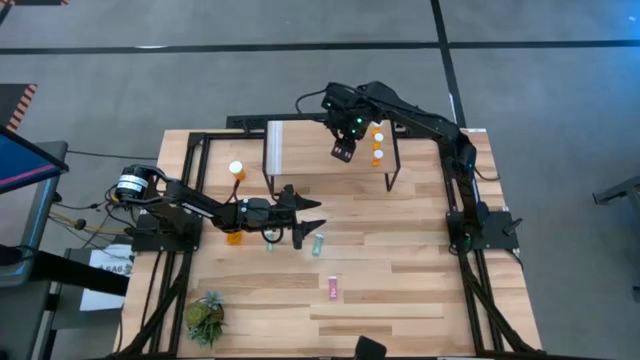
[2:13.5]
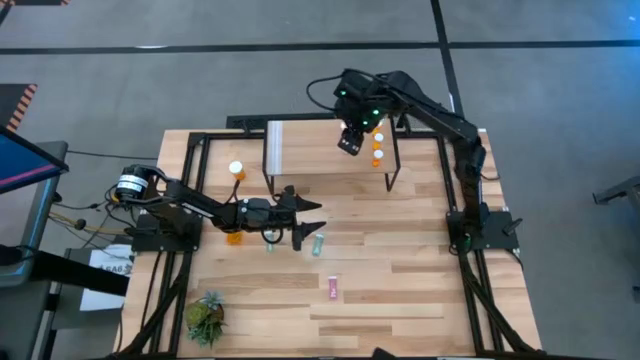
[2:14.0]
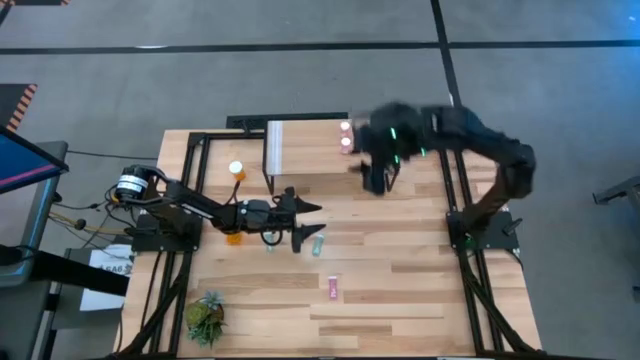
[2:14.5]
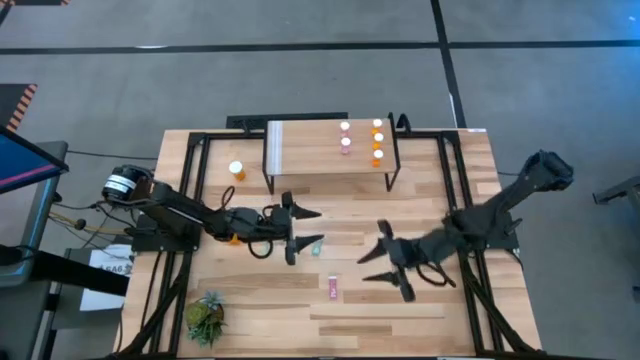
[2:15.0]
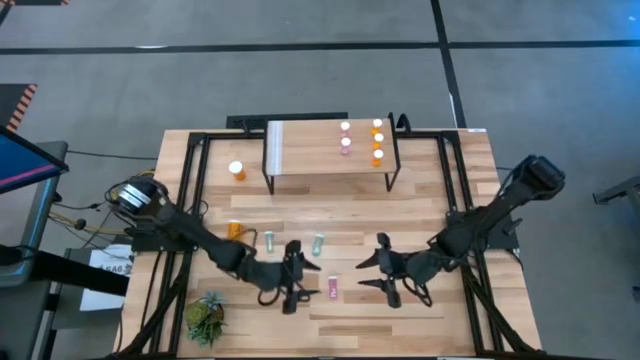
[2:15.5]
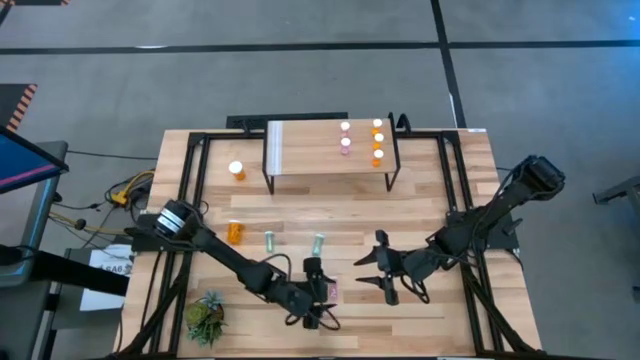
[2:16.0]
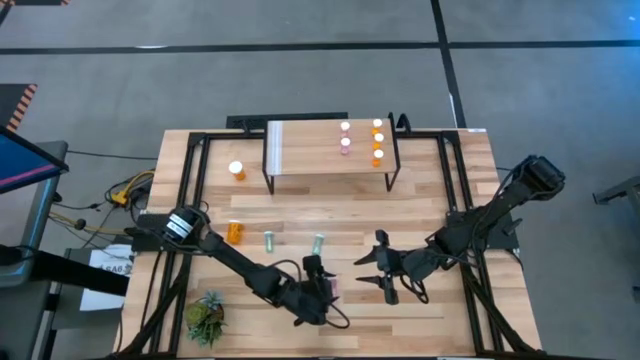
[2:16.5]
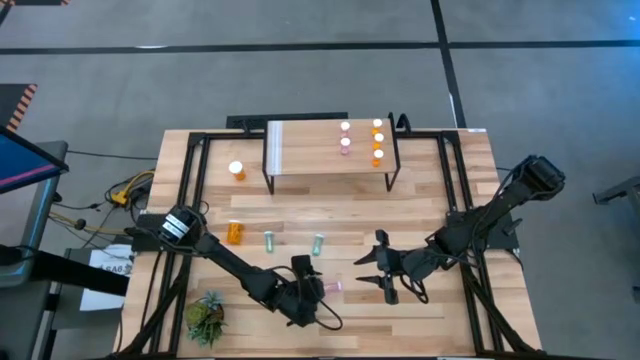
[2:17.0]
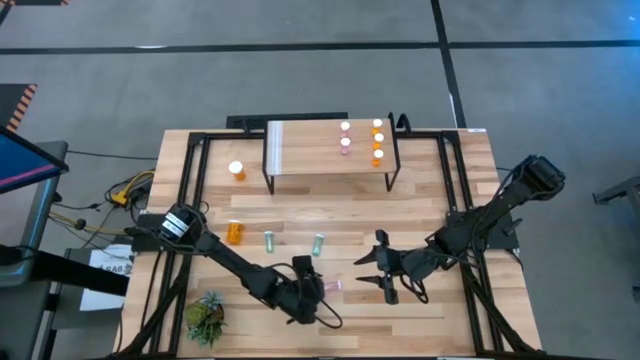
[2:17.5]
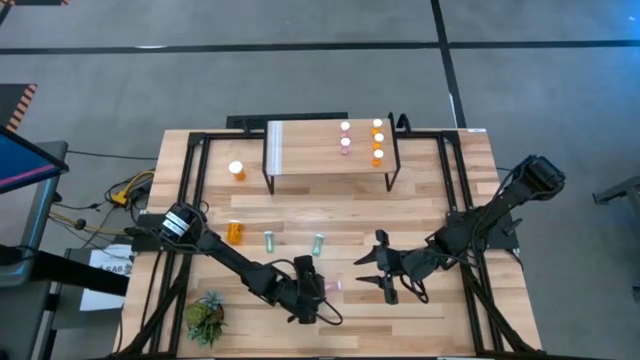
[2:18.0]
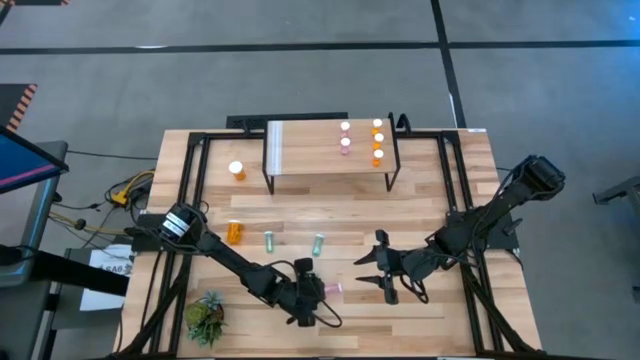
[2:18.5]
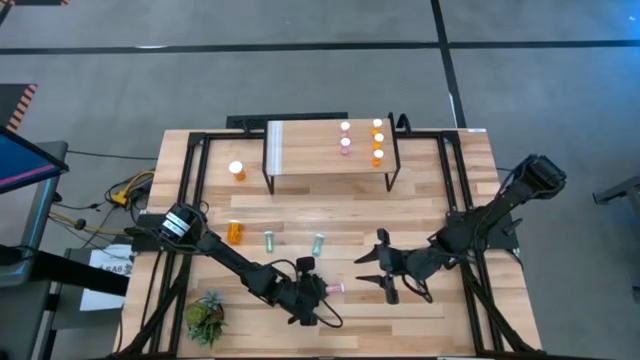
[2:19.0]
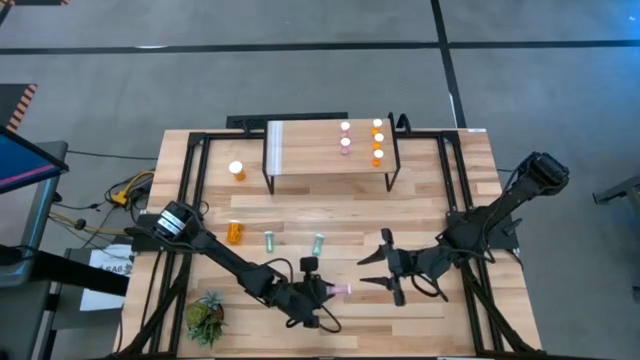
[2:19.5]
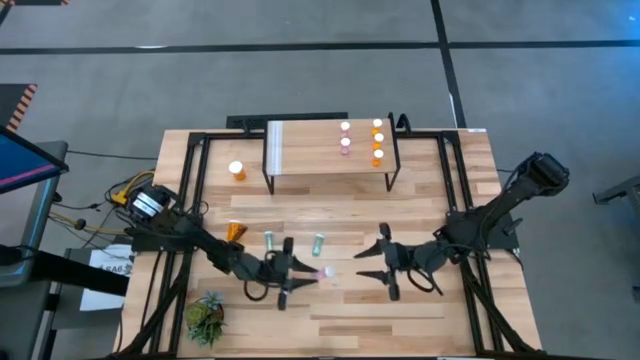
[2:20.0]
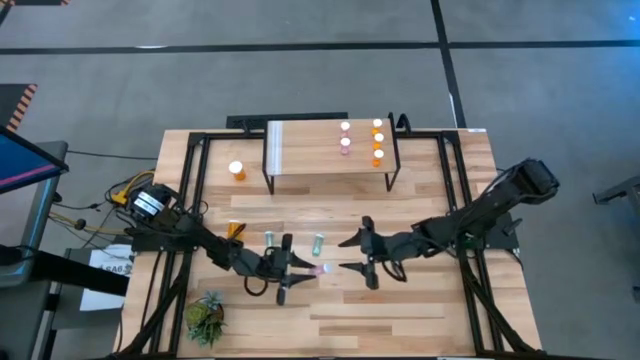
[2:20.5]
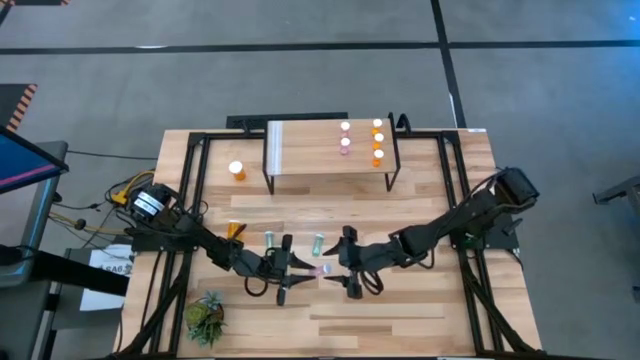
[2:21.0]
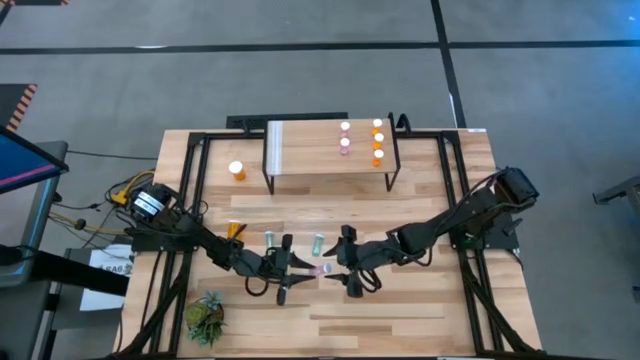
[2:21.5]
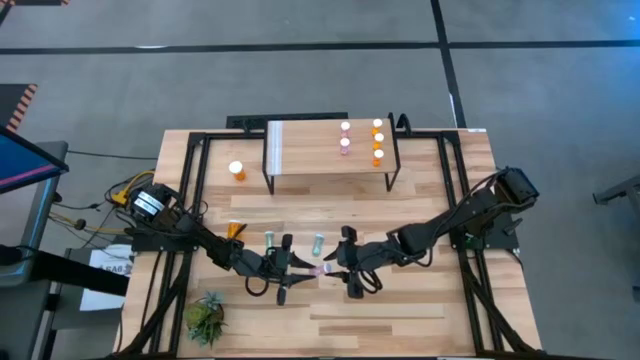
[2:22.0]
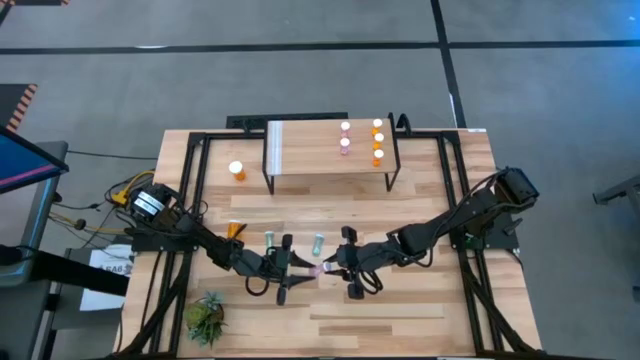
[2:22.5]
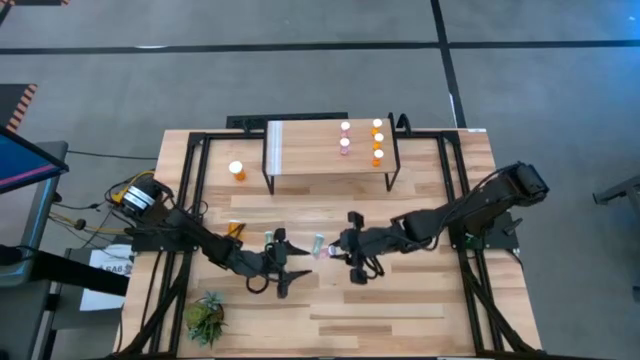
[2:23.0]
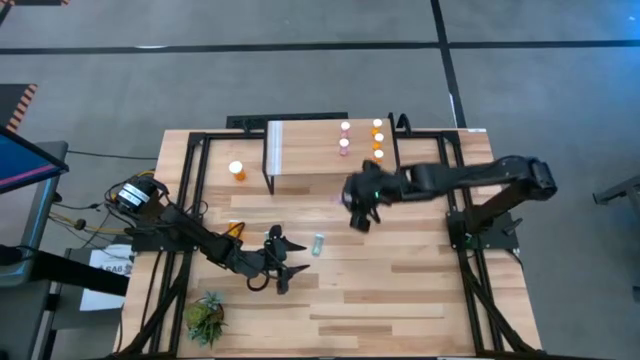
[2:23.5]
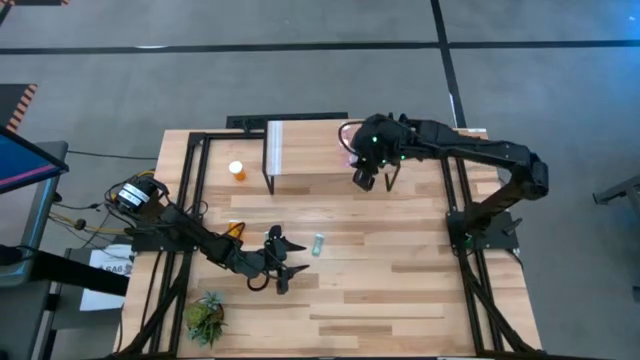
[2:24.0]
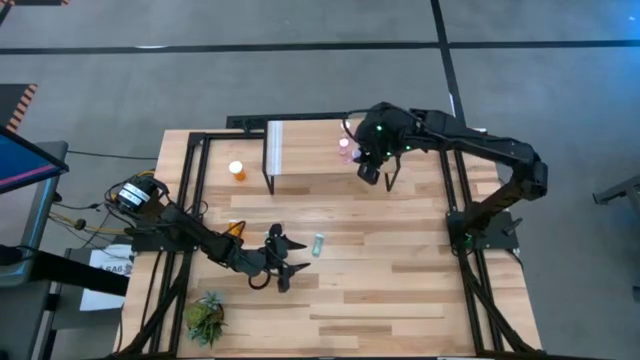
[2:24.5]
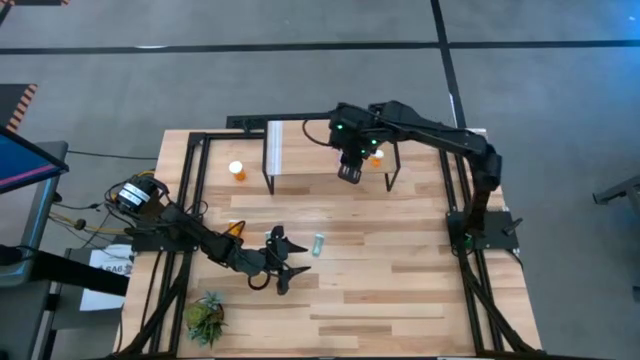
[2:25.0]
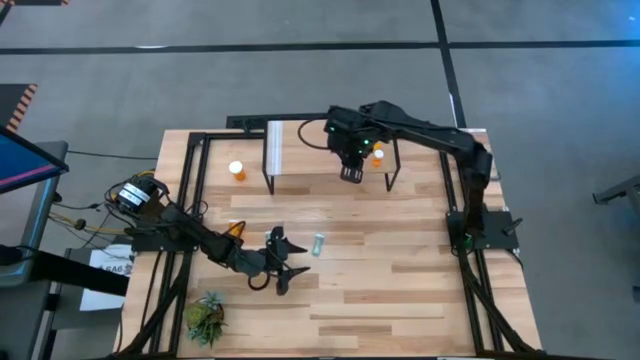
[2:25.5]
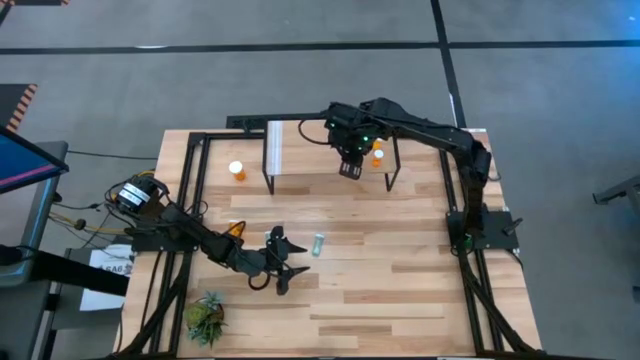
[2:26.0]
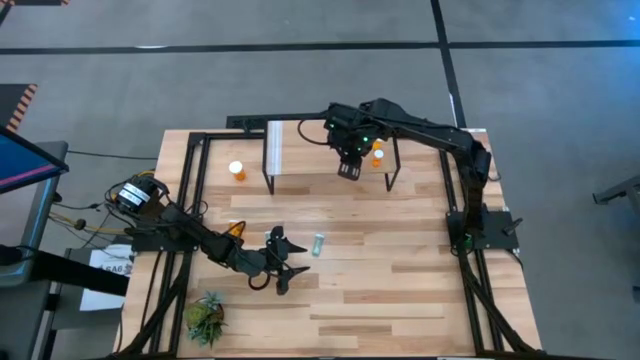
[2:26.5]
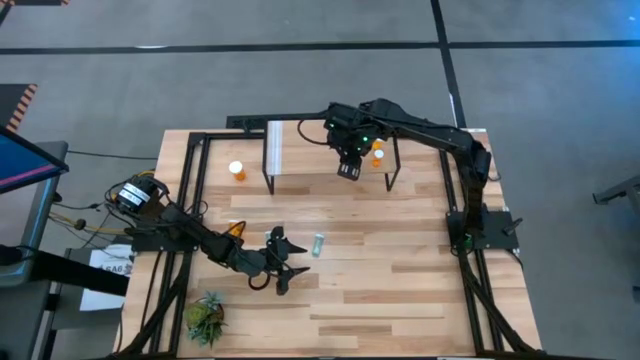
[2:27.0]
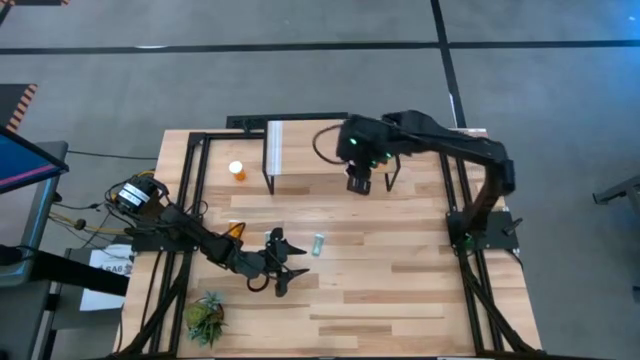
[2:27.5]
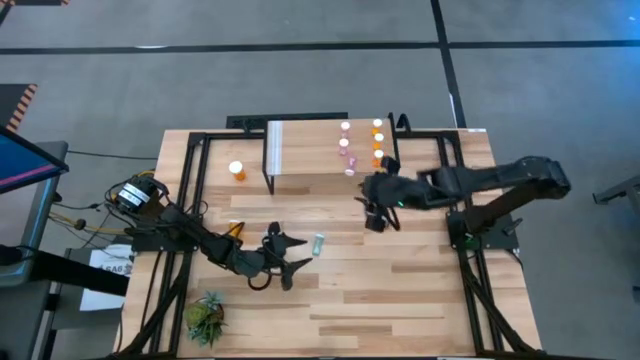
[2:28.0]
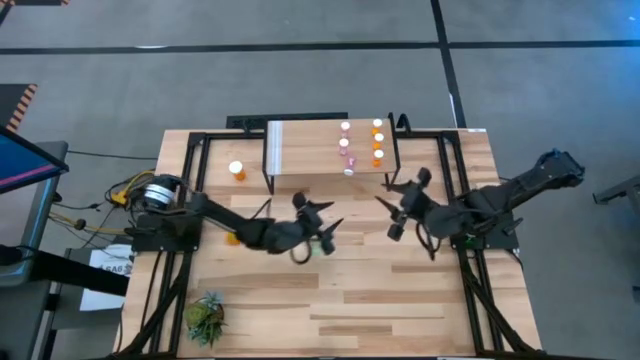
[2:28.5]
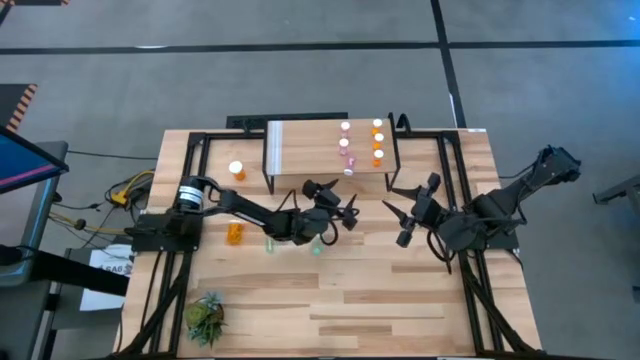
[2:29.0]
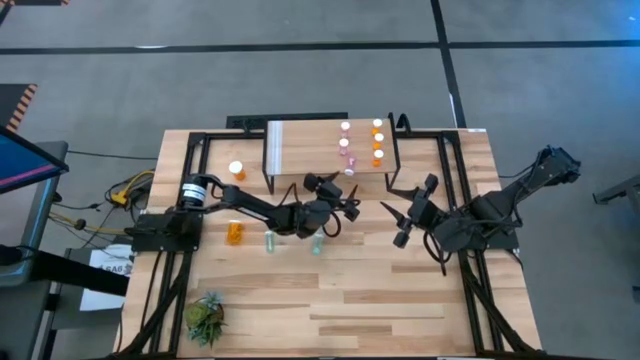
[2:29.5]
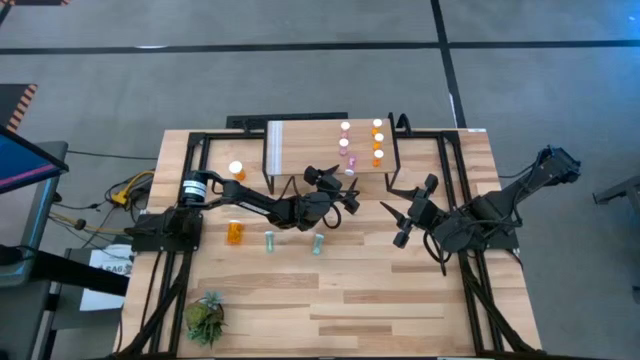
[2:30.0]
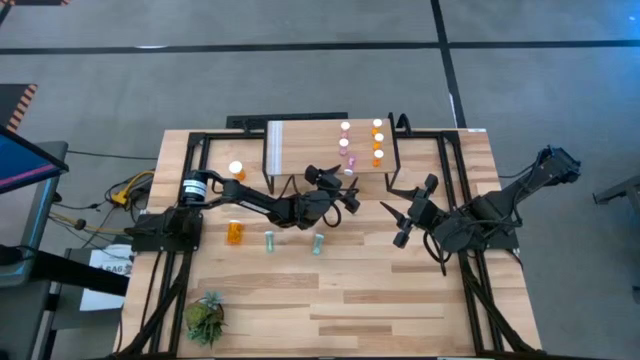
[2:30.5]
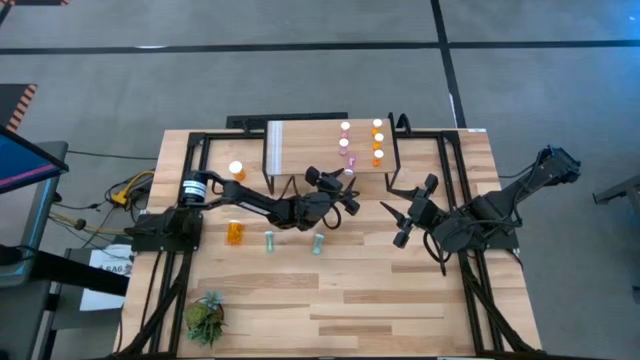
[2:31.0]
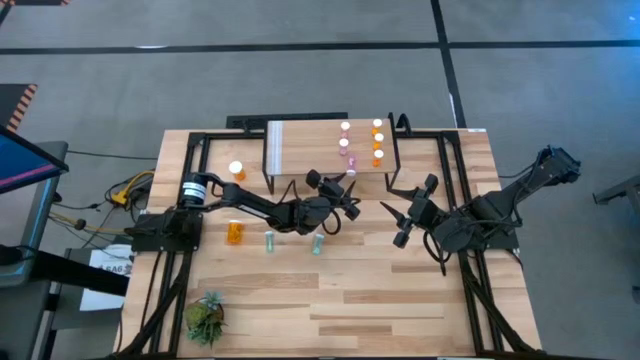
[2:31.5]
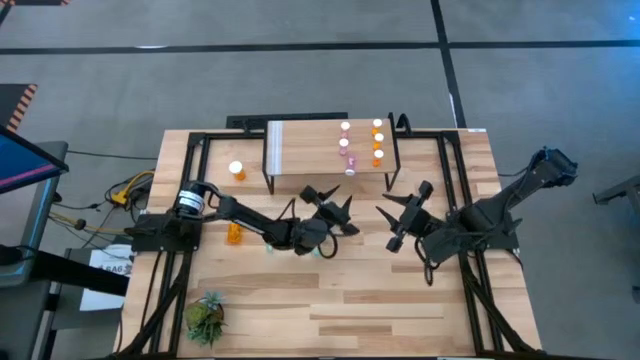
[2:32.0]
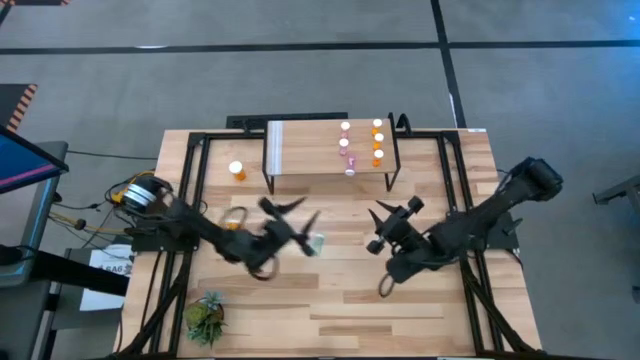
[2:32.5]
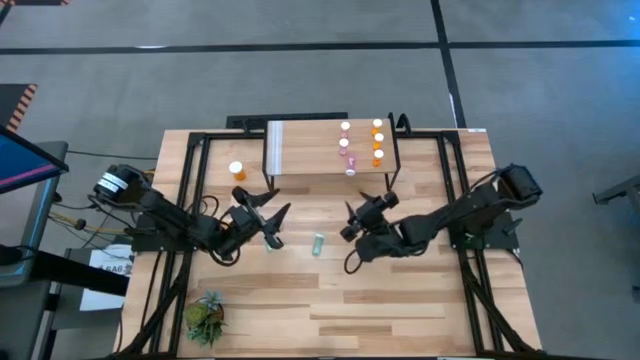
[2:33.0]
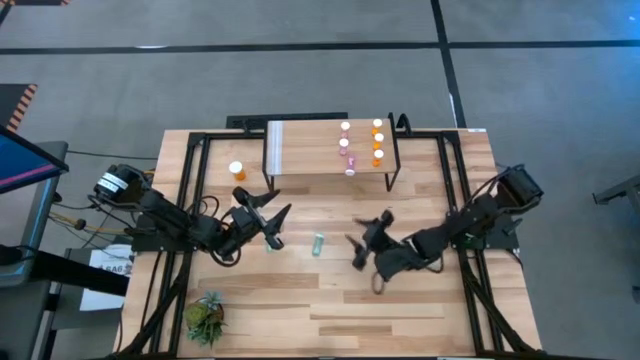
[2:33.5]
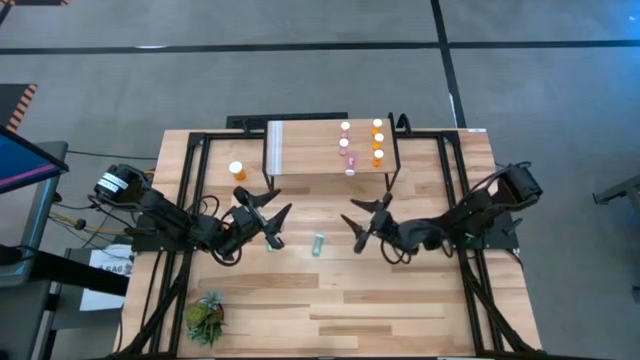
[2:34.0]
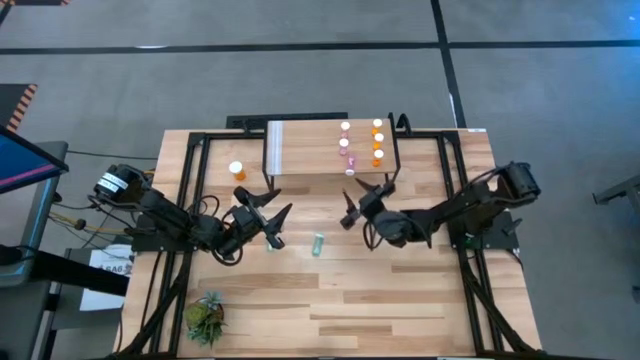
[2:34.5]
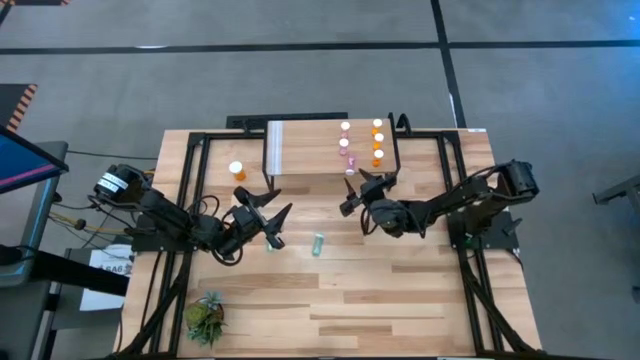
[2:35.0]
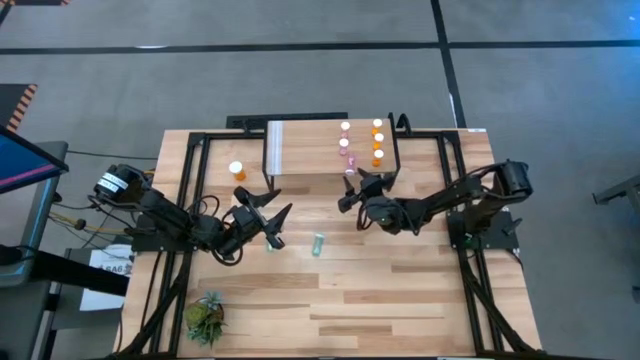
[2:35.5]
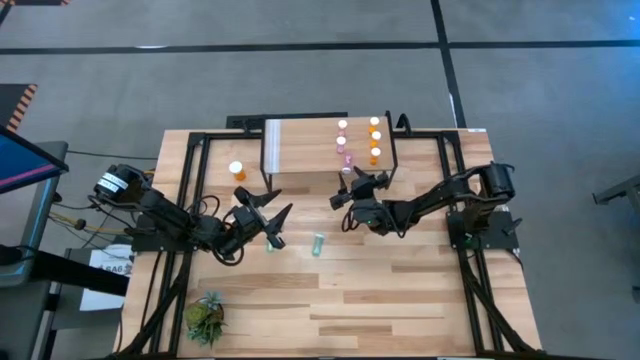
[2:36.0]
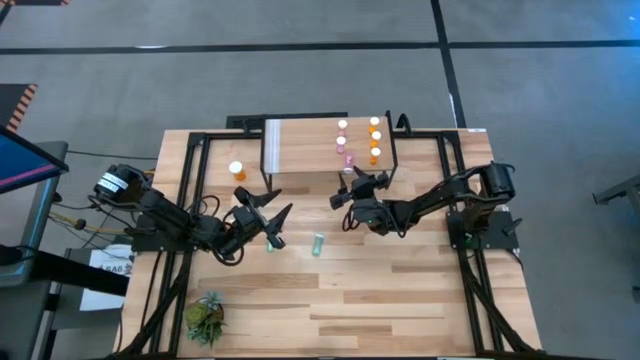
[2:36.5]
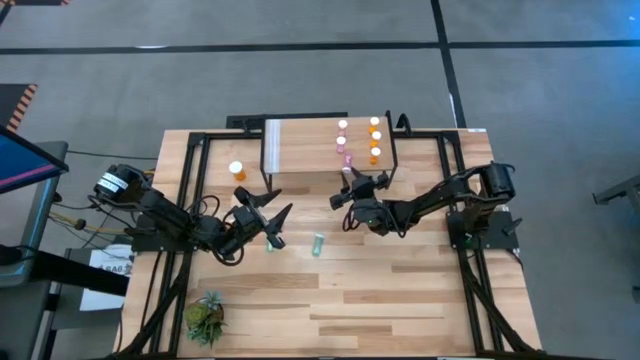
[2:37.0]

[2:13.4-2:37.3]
Task: Pick and place medicine bottles onto shelf by color
Put the pink pill bottle on the shelf
